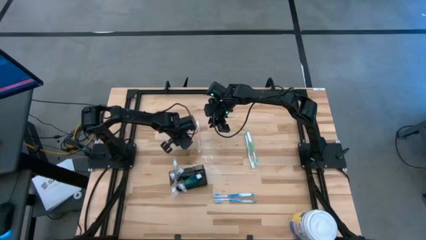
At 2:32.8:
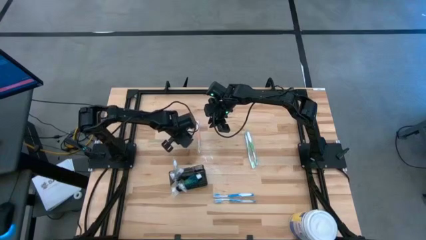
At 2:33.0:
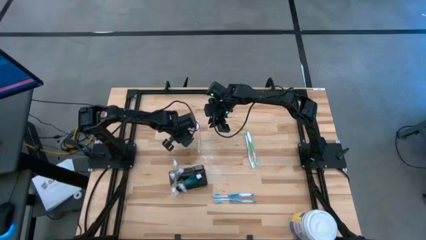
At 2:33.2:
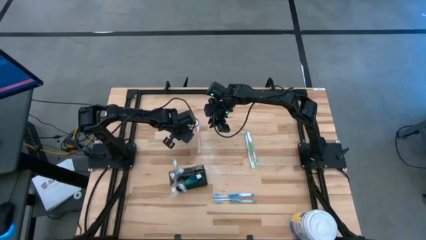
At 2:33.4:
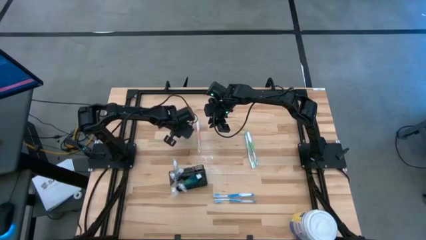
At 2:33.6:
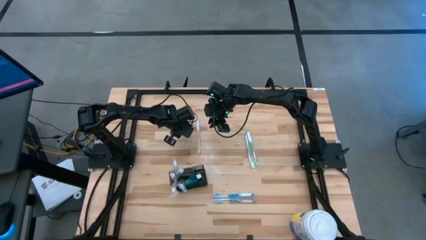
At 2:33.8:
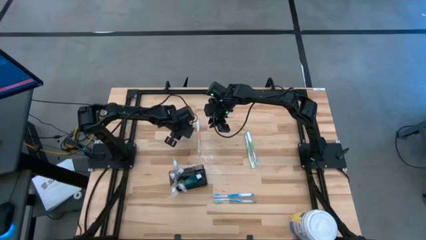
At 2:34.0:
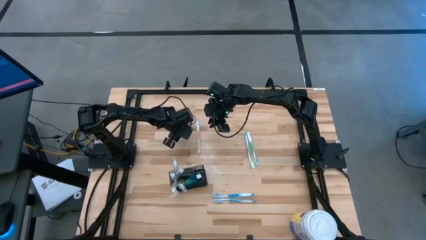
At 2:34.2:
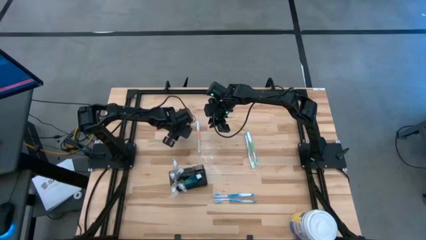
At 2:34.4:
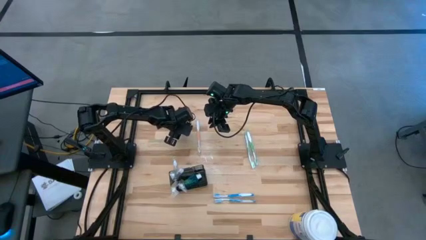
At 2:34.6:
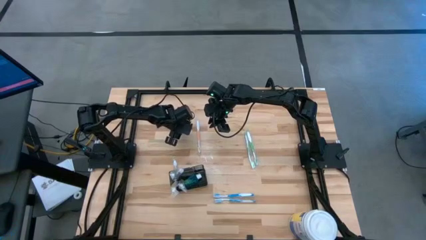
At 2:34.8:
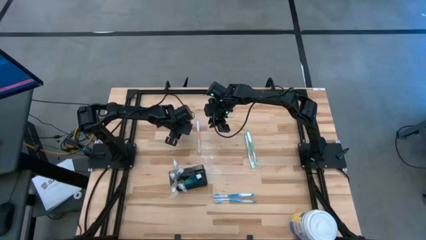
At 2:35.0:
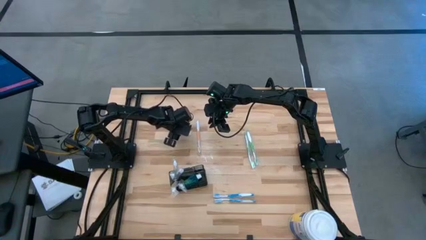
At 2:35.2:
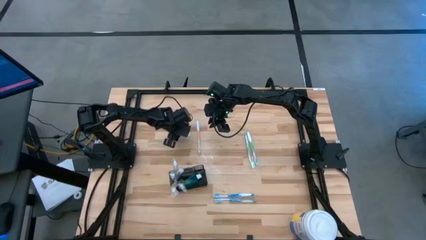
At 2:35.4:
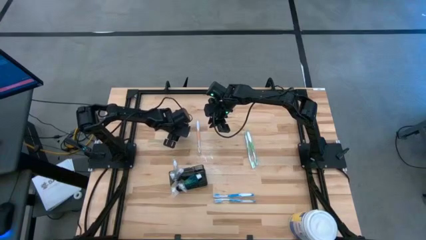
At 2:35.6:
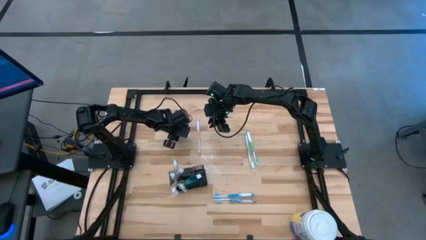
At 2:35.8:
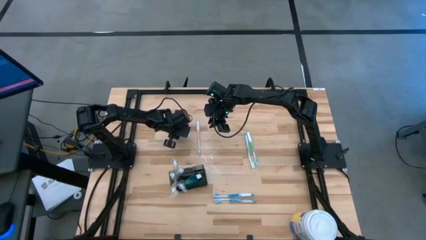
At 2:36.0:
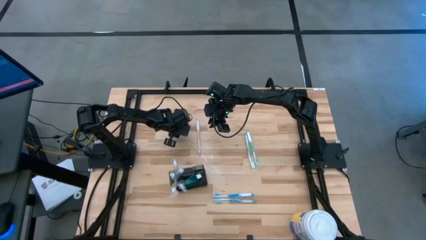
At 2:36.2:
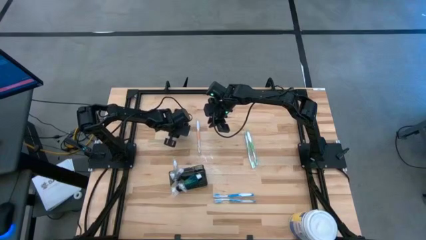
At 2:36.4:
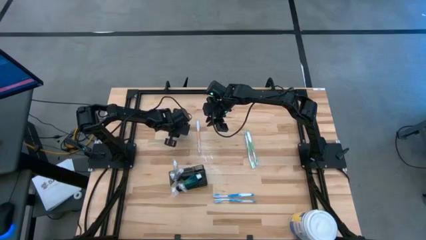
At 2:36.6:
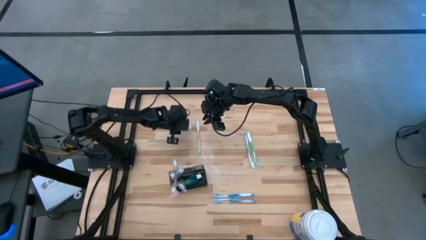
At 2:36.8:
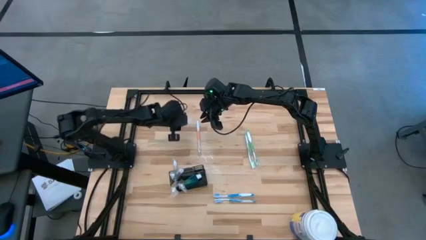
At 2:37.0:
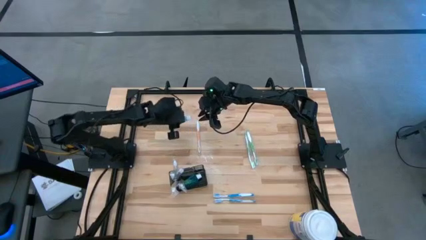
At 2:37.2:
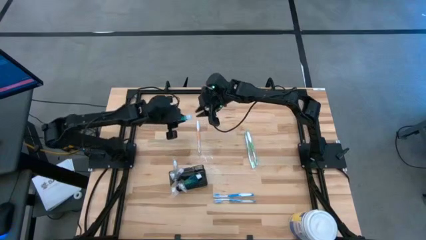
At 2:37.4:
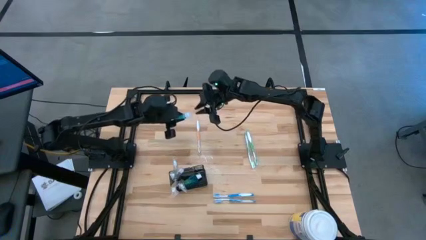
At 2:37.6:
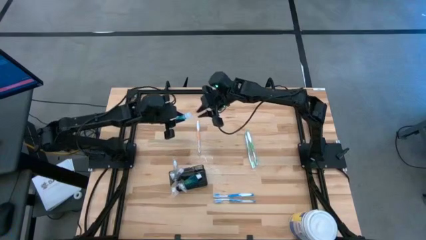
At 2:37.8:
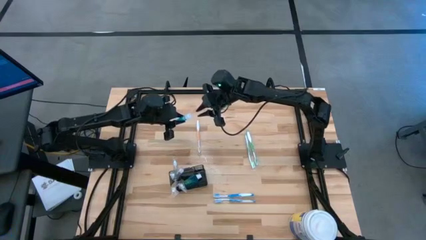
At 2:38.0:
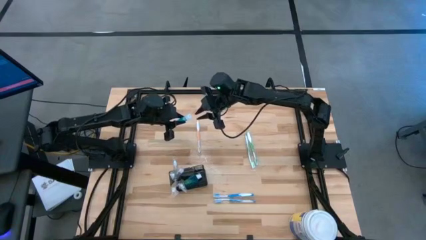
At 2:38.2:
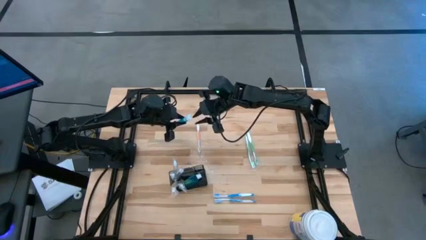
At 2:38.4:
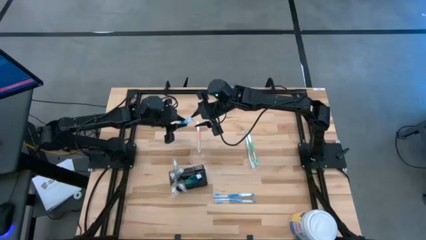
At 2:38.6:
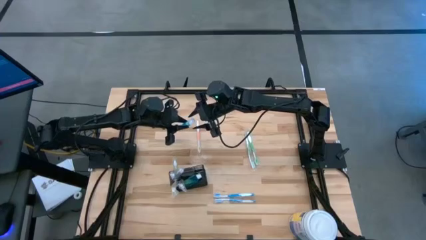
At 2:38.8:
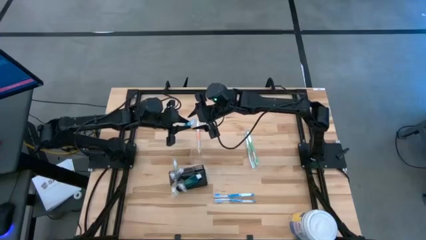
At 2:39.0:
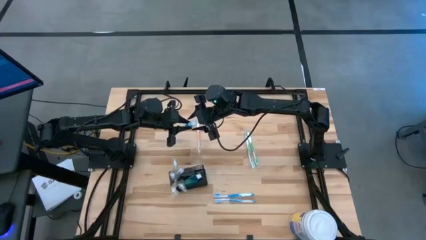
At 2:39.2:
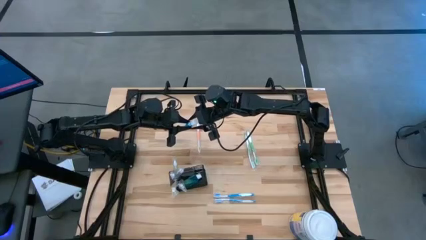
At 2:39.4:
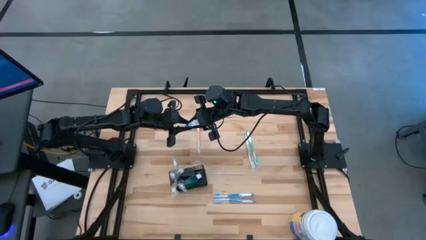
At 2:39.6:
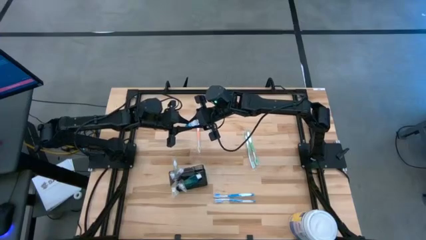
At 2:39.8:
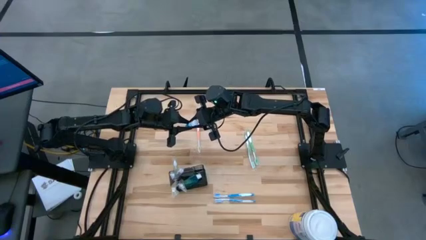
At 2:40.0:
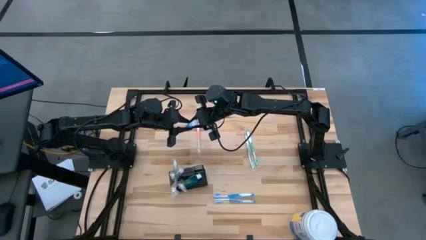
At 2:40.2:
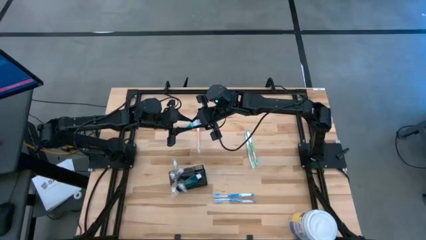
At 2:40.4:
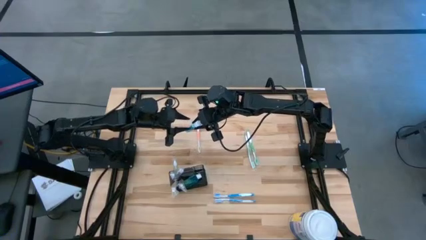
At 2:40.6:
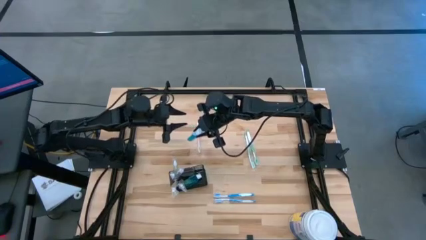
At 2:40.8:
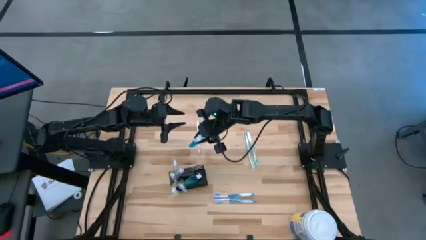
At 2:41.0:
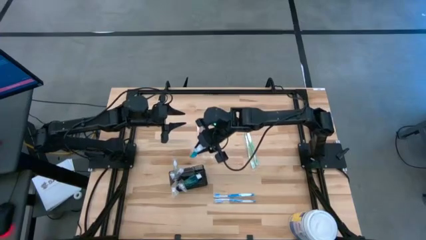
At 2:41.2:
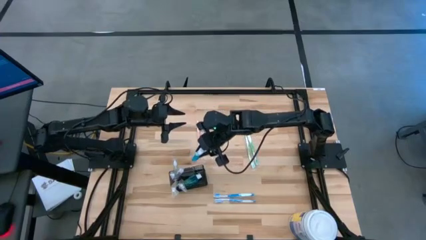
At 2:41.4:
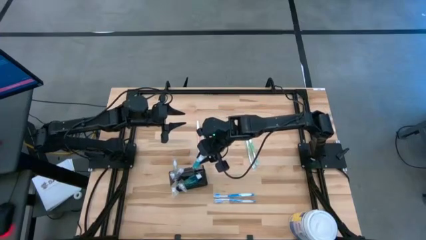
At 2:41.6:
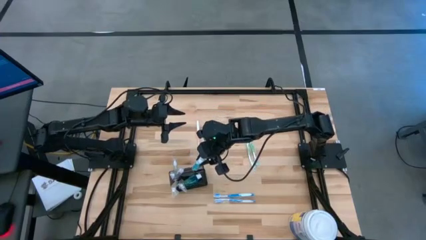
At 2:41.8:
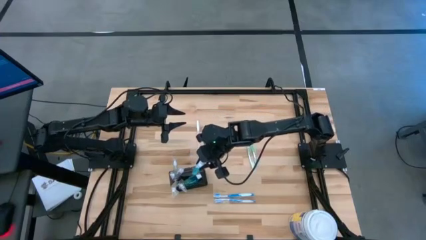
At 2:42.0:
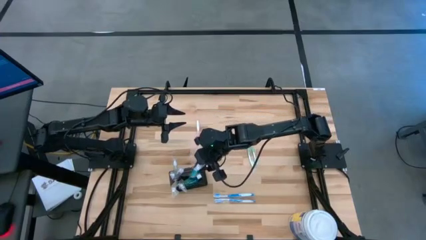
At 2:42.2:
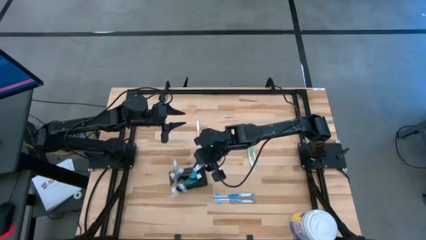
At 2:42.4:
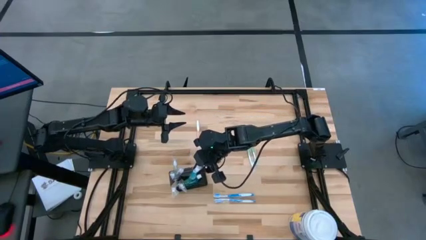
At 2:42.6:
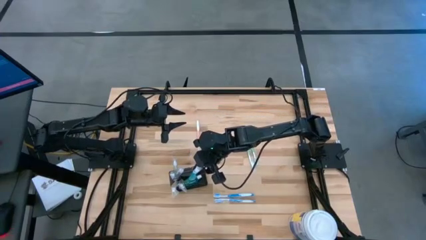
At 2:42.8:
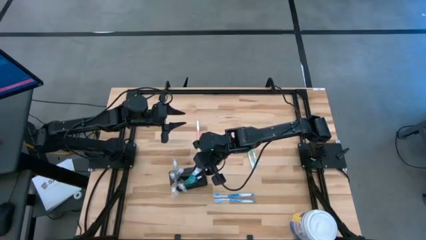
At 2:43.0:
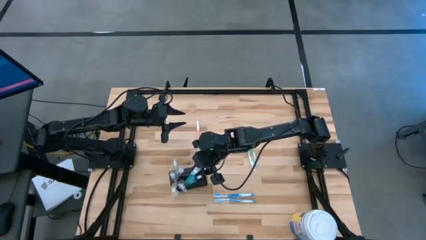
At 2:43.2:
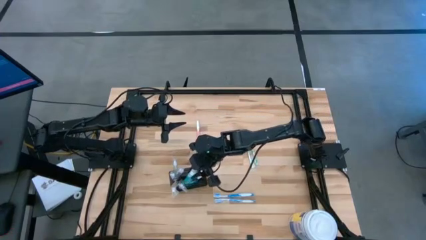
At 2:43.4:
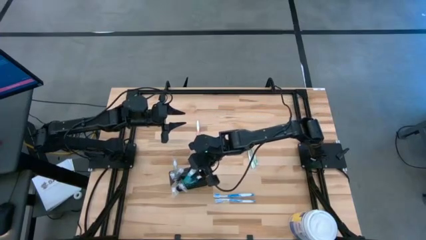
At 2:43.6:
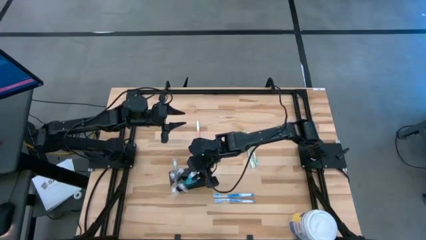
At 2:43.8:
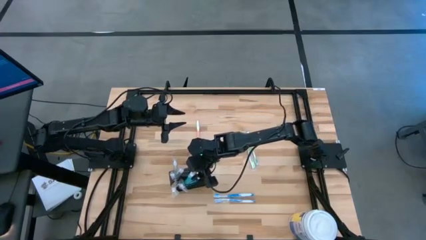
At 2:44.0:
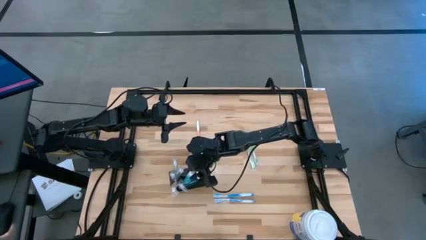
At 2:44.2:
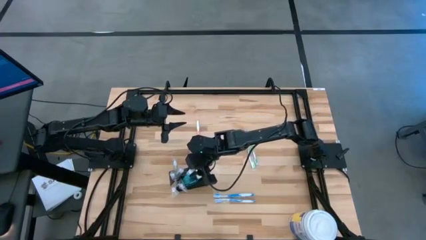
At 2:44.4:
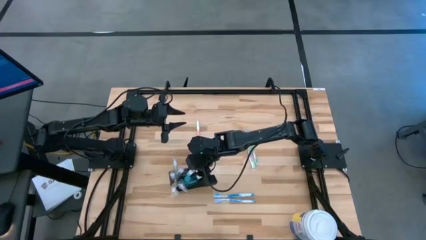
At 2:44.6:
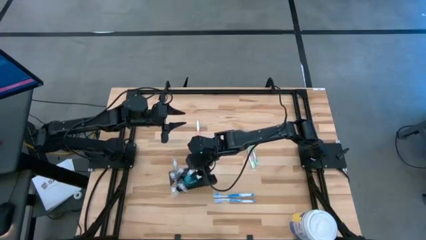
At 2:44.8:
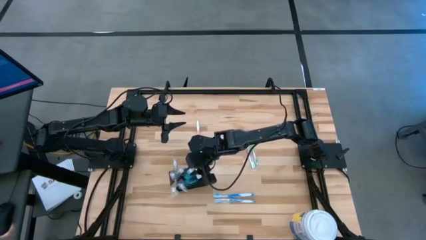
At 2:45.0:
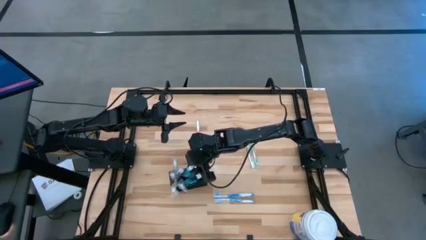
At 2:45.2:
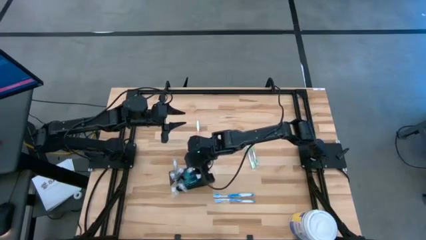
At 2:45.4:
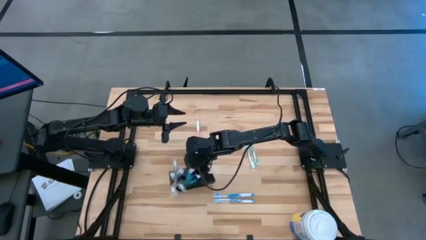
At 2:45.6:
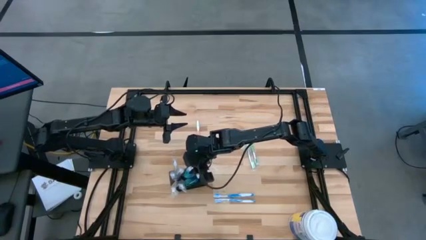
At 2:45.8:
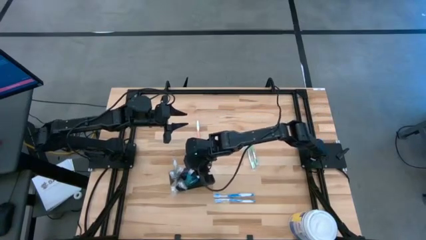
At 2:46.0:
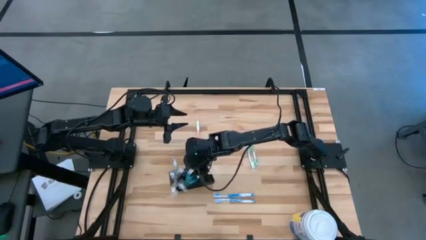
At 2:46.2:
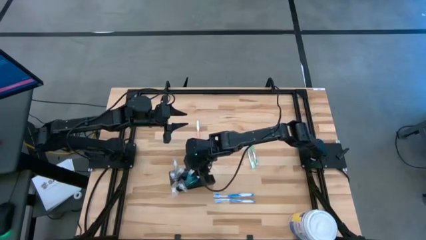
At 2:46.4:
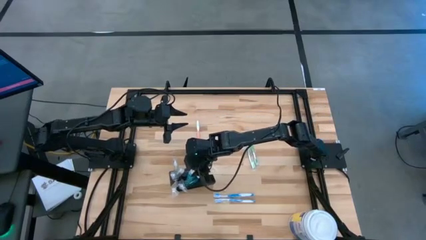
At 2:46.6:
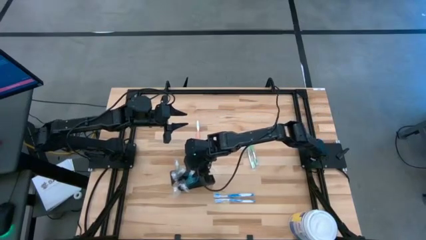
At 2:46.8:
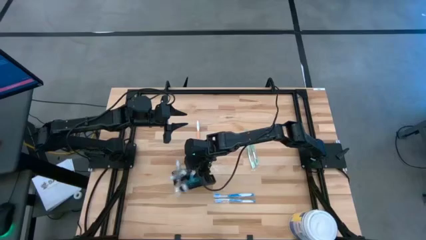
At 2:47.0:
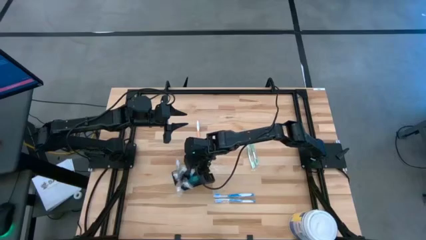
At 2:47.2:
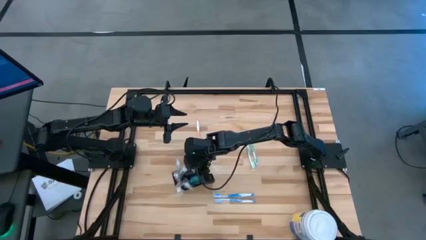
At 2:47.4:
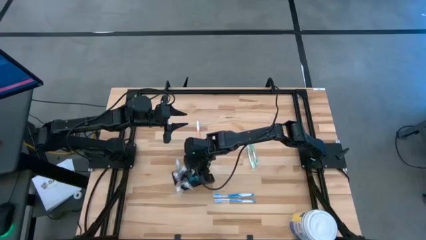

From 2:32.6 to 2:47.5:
Task: Pick & Place toothbrushing station
Put the mouthwash into the black toothbrush rack

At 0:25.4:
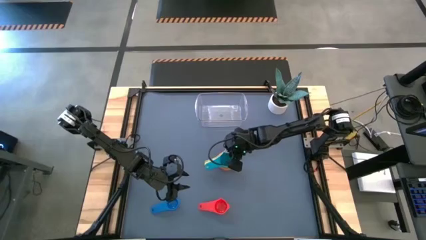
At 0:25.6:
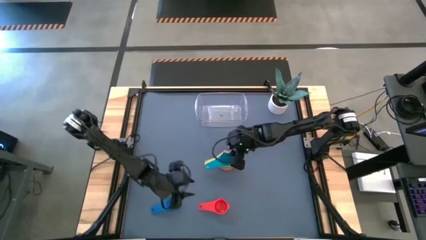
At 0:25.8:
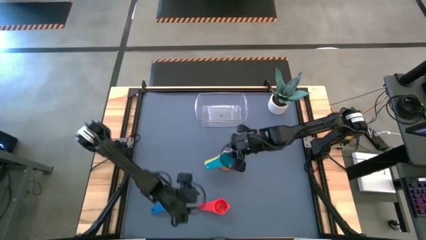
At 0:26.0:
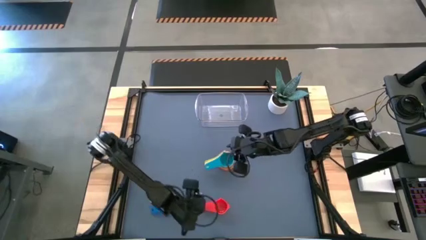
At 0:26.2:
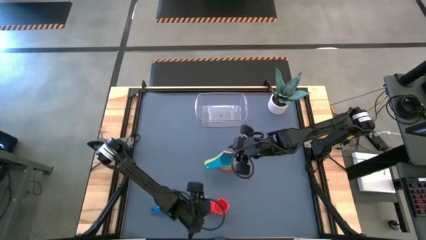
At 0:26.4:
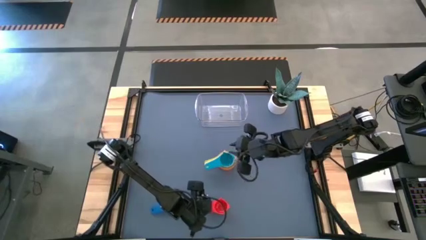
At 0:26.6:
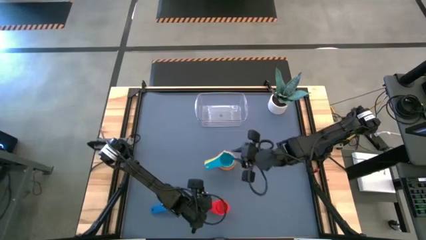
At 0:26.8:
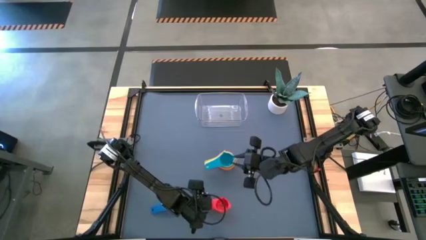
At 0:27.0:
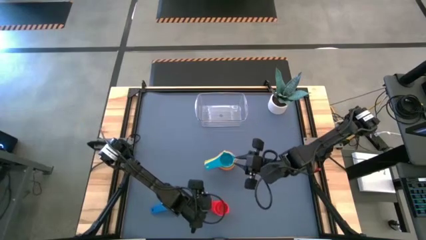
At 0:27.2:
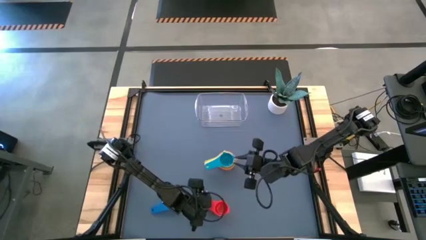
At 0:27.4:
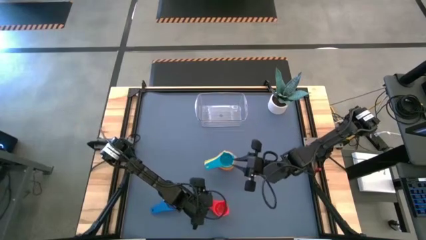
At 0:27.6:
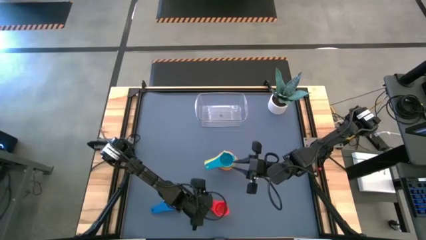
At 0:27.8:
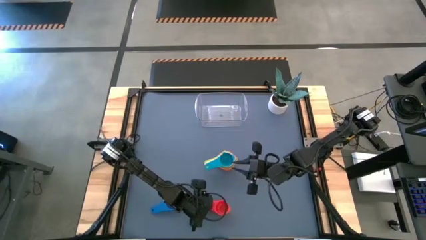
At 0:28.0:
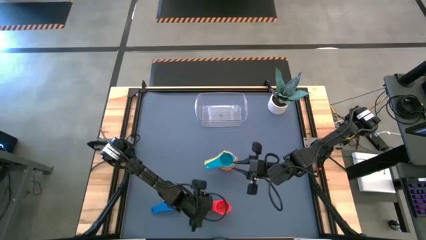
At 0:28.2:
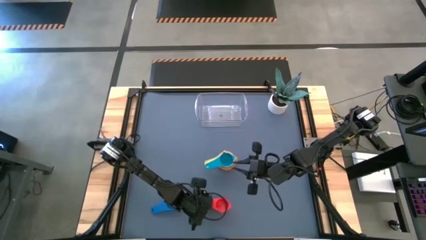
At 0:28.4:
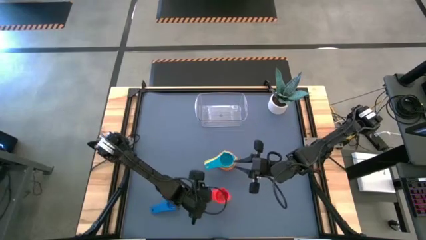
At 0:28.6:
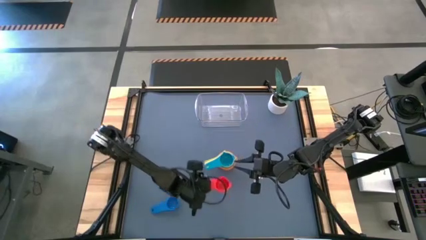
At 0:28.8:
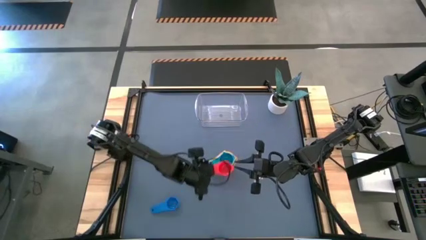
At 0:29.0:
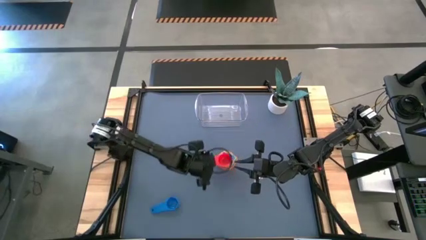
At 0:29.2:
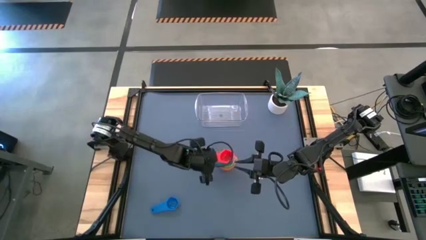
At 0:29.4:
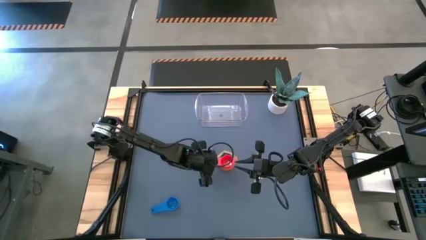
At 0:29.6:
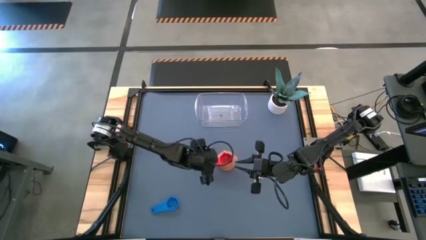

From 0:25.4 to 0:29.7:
Task: Nest measuring cups in basket
Stack the red measuring cup on top of the light blue measuring cup
